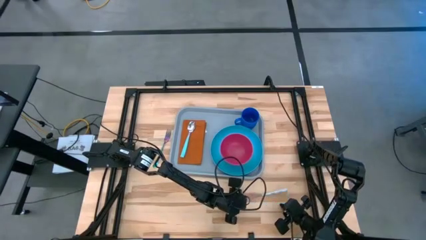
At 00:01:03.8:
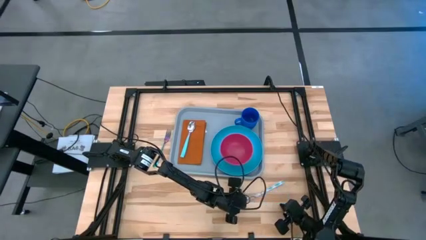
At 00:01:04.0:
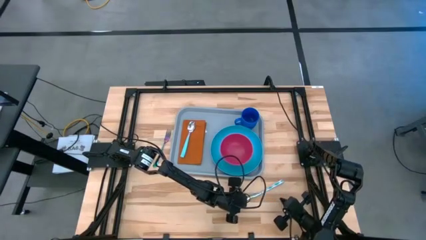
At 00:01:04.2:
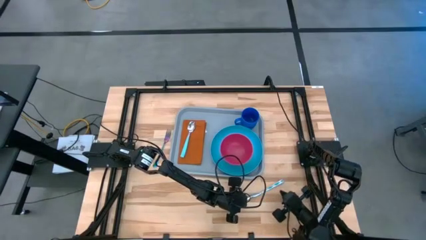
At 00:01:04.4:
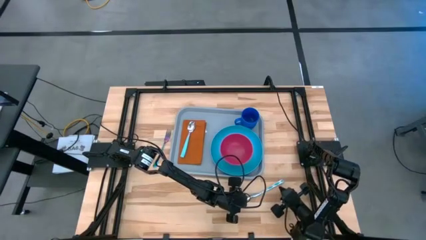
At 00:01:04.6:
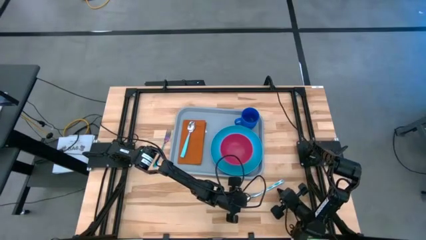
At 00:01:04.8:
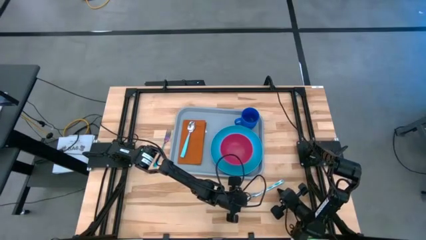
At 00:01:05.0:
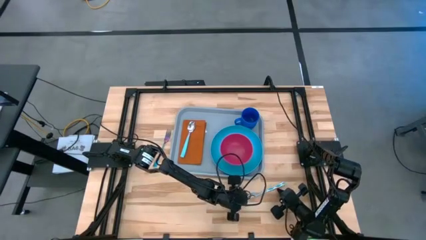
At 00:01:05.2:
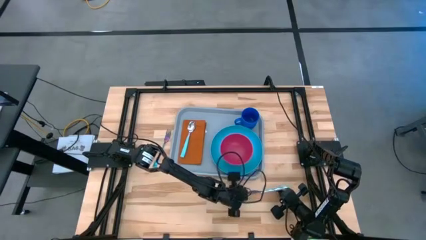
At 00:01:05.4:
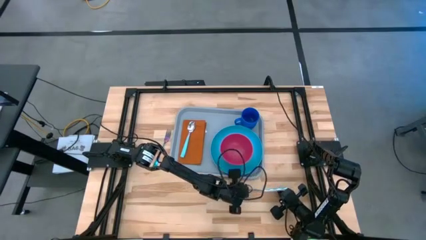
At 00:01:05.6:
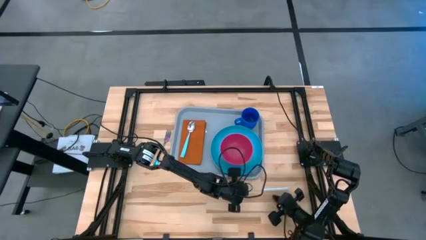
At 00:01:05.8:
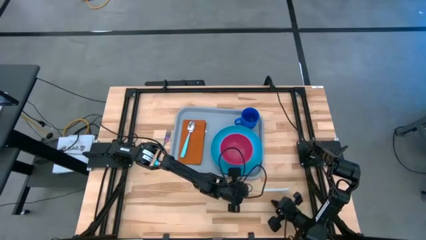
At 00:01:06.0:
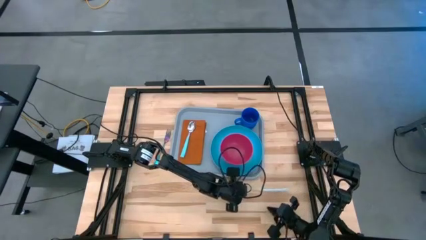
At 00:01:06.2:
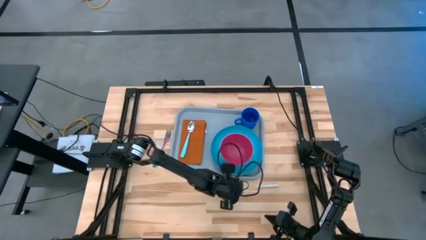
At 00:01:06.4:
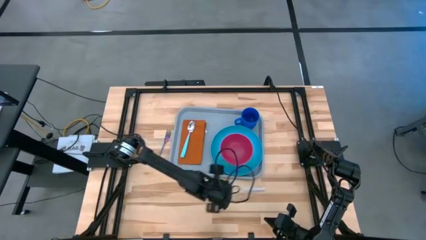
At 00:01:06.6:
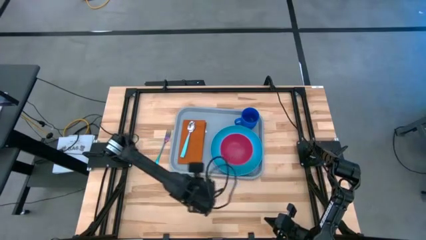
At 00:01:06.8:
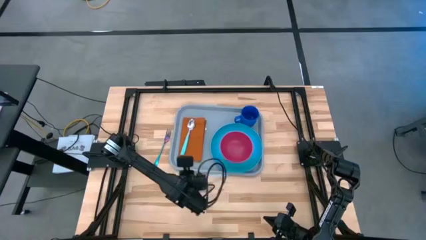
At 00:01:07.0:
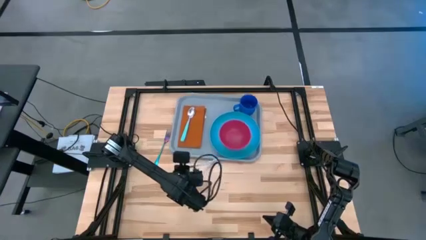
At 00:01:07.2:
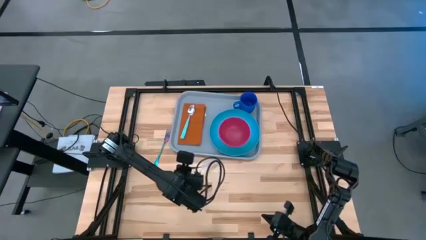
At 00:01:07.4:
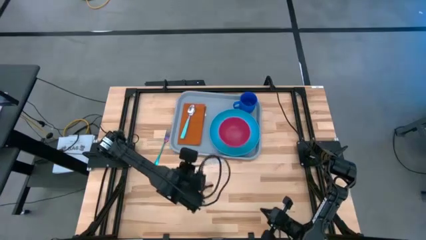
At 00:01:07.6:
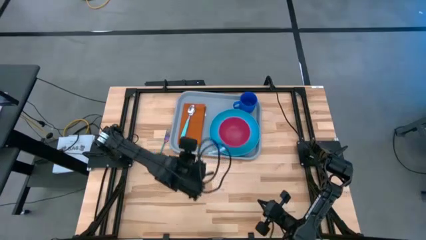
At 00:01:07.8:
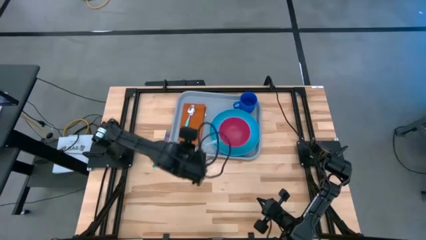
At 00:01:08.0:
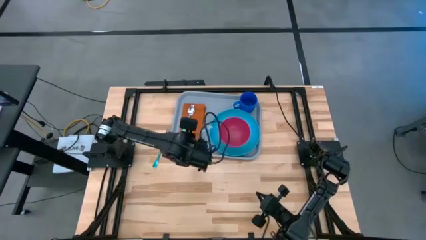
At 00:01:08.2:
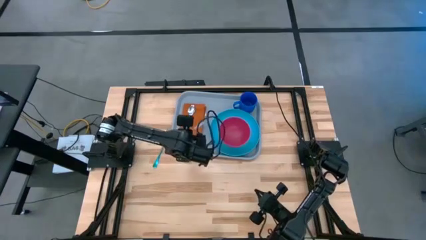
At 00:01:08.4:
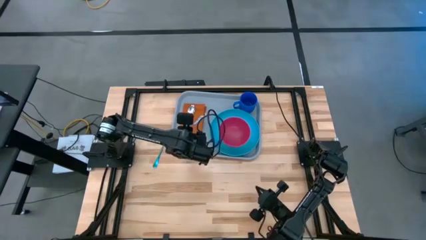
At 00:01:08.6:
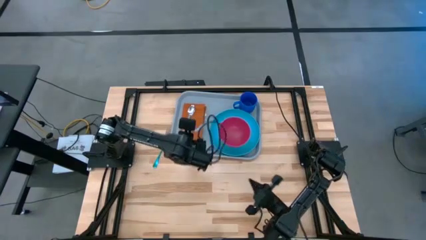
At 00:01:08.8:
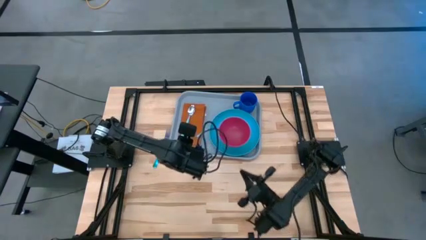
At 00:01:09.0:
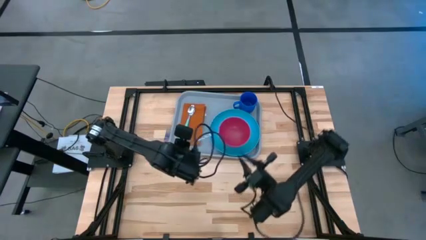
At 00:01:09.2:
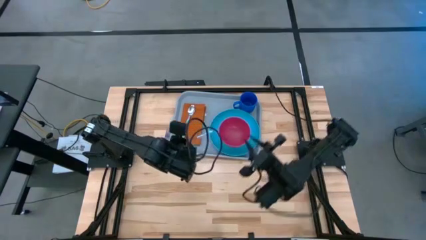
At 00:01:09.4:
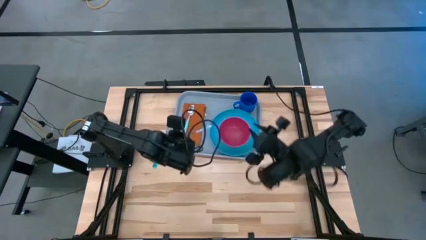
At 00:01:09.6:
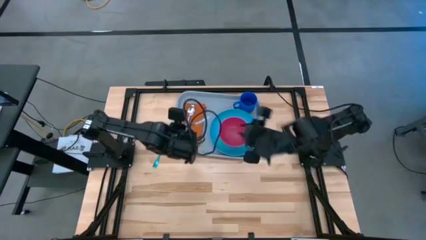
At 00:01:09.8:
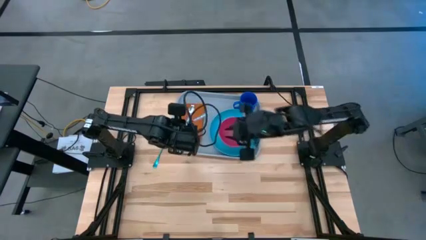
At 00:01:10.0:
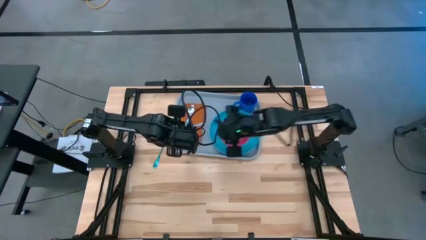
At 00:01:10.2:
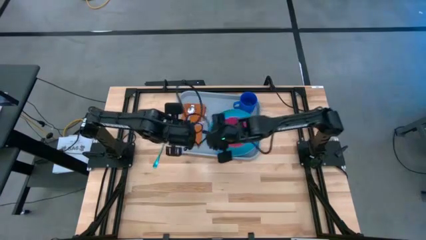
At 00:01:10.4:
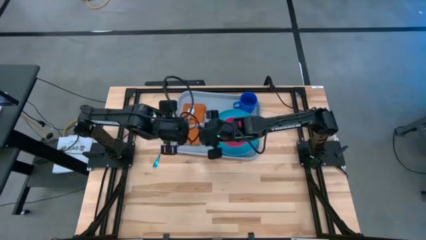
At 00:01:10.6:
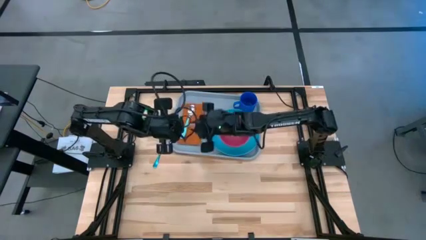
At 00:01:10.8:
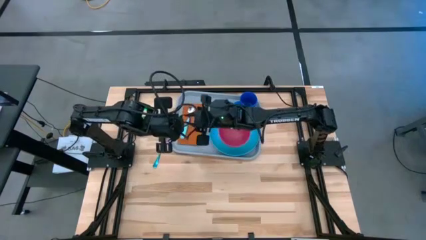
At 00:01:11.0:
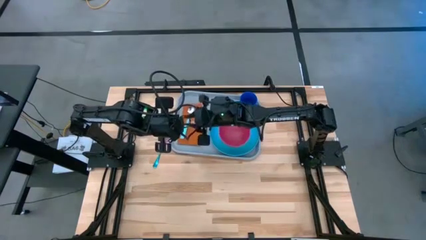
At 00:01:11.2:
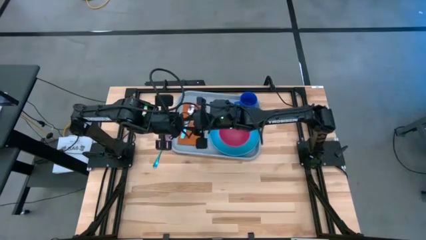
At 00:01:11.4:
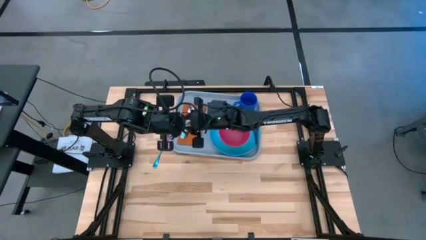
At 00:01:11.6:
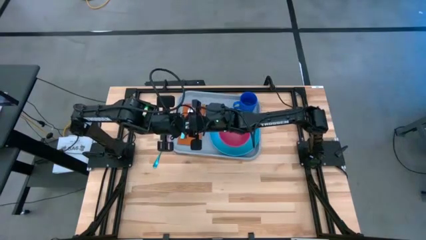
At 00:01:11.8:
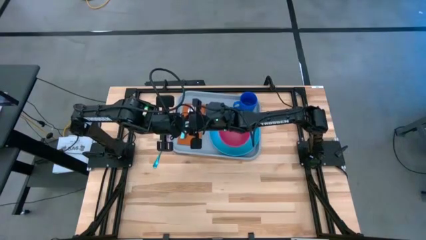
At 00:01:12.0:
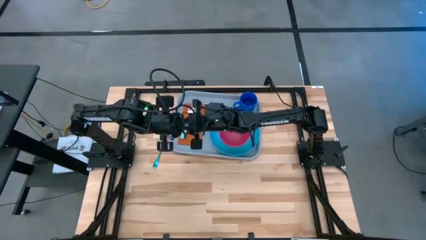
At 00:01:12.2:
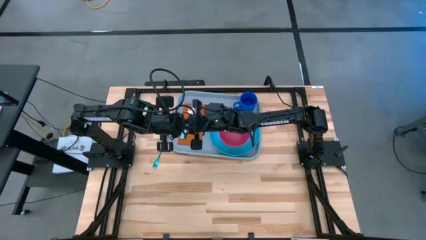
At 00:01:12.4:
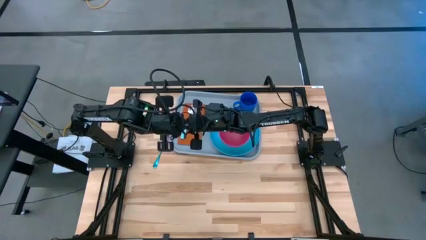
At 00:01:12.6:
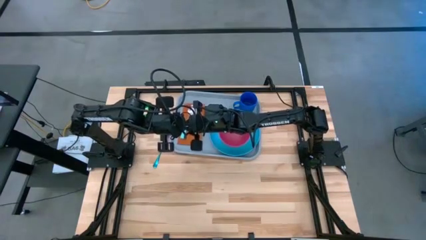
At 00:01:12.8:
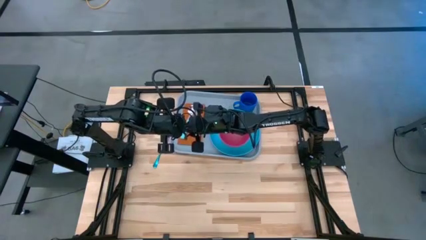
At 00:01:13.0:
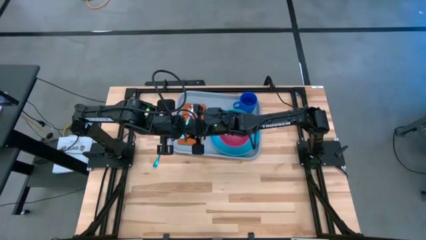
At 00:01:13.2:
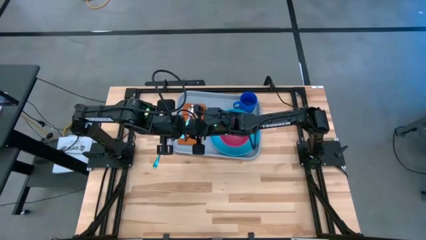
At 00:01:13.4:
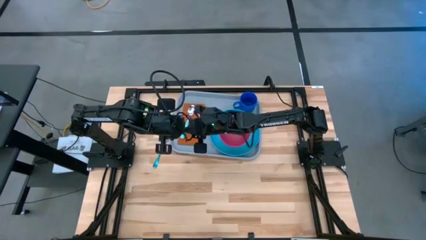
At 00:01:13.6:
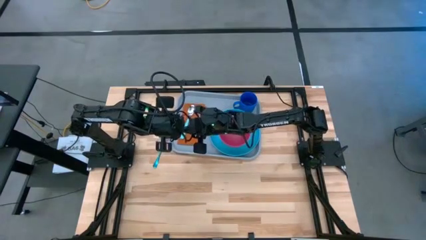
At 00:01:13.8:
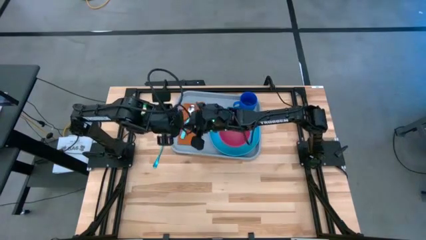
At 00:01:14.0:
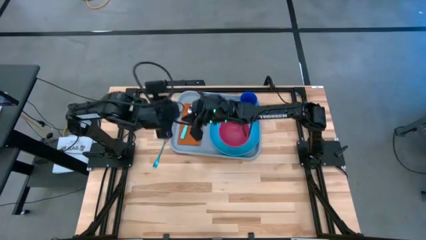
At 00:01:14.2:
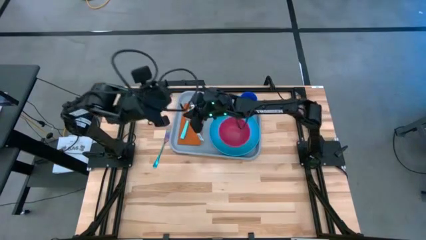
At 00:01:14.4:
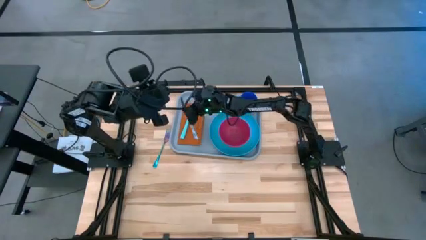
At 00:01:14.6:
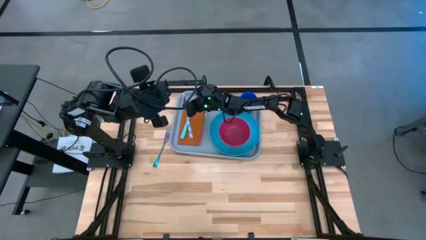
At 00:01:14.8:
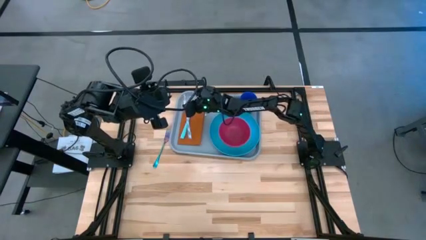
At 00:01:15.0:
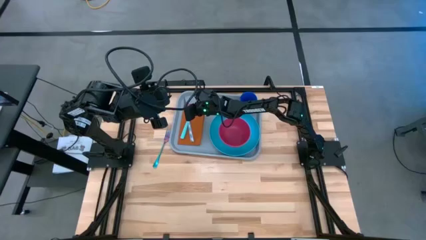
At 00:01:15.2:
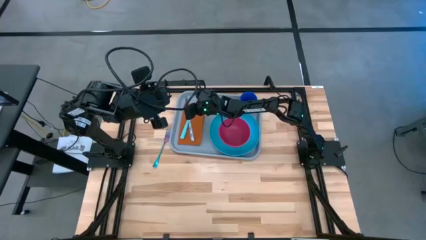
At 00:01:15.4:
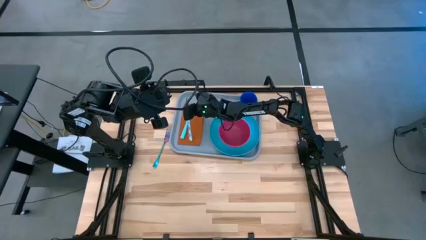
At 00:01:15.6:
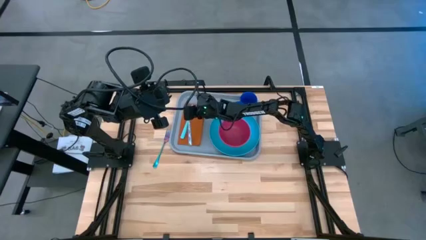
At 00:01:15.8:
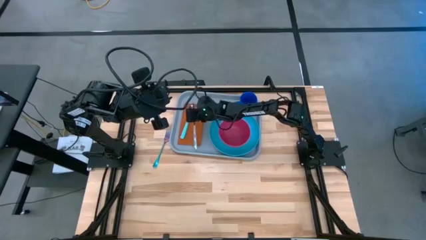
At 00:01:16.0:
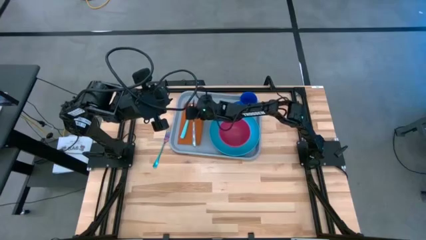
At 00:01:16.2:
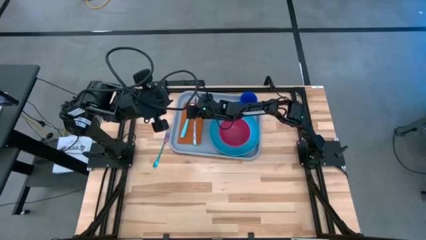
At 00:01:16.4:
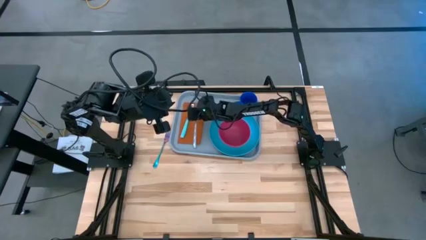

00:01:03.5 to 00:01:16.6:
Task: Set up tray
Put the white patterned knife on the brown table napkin to the left of the blue plate

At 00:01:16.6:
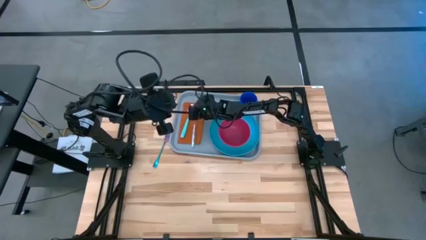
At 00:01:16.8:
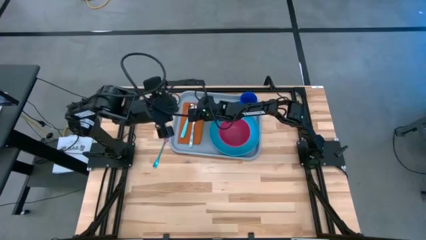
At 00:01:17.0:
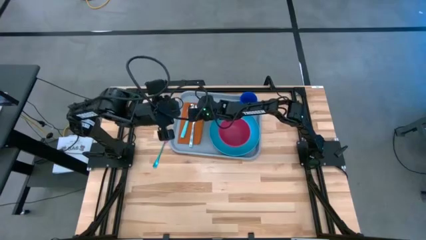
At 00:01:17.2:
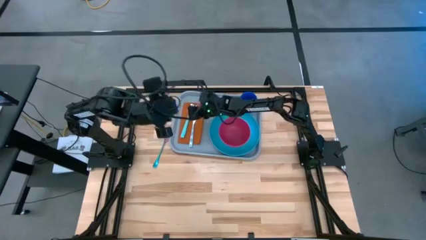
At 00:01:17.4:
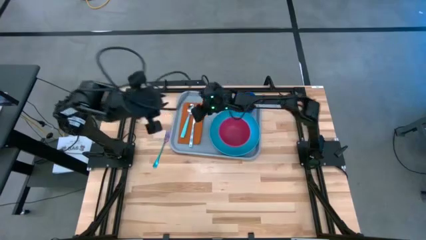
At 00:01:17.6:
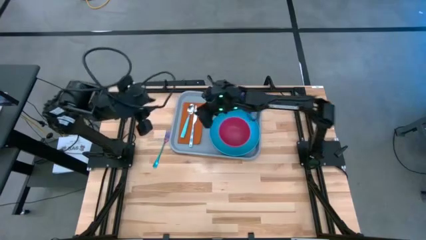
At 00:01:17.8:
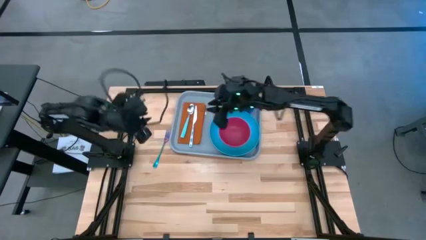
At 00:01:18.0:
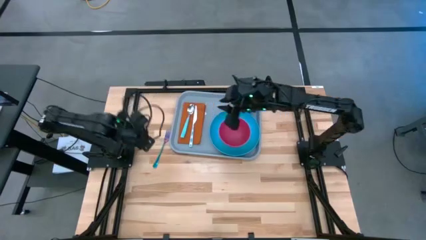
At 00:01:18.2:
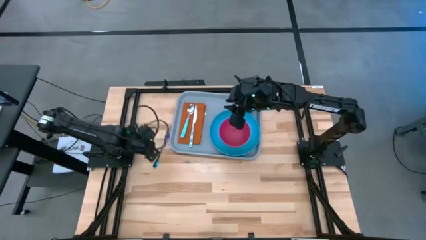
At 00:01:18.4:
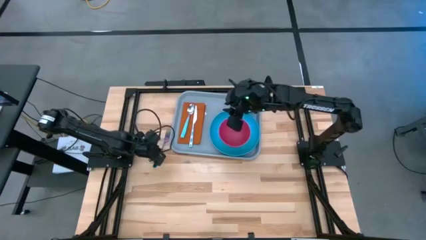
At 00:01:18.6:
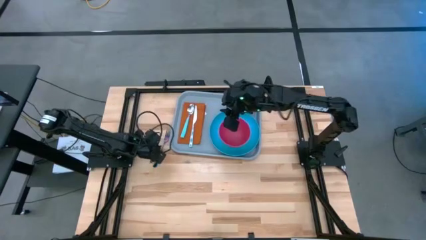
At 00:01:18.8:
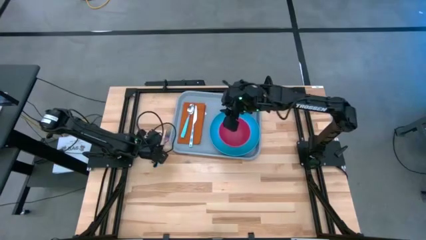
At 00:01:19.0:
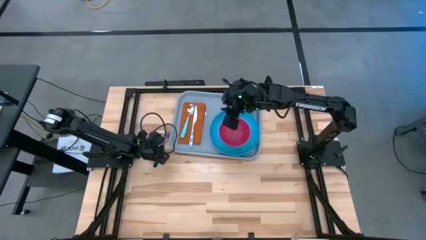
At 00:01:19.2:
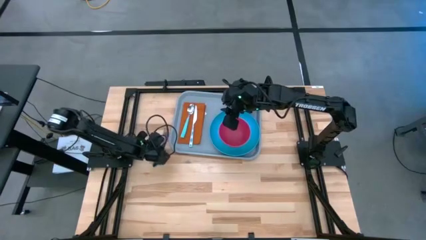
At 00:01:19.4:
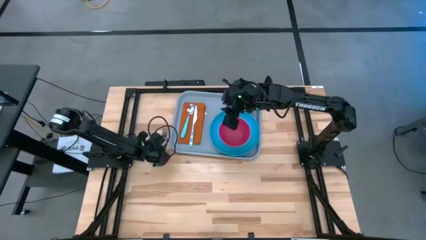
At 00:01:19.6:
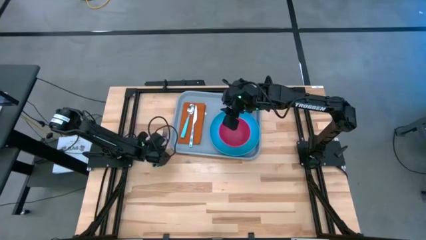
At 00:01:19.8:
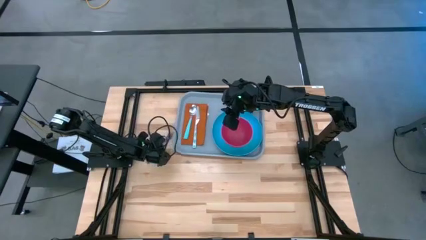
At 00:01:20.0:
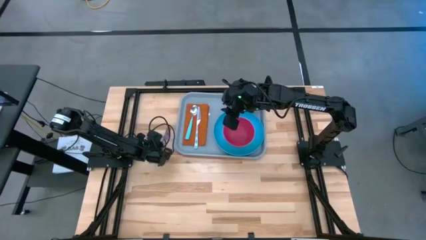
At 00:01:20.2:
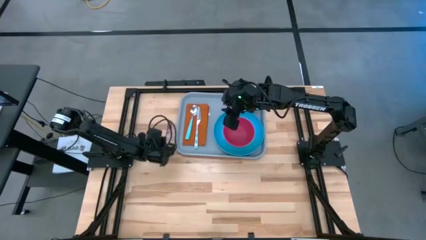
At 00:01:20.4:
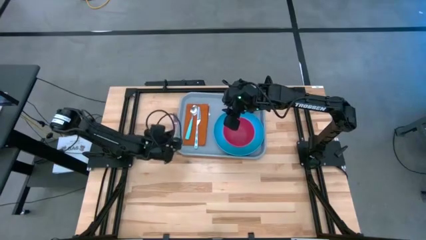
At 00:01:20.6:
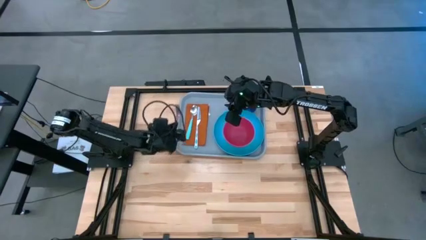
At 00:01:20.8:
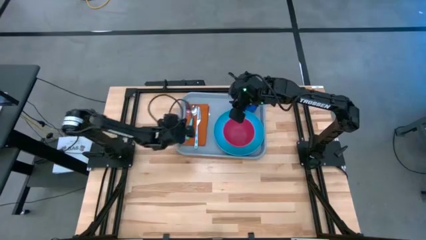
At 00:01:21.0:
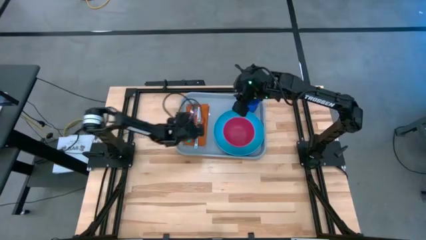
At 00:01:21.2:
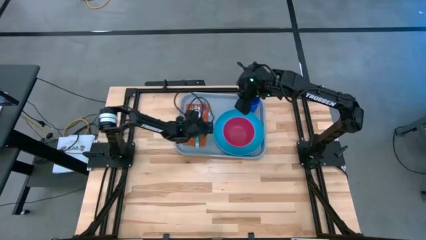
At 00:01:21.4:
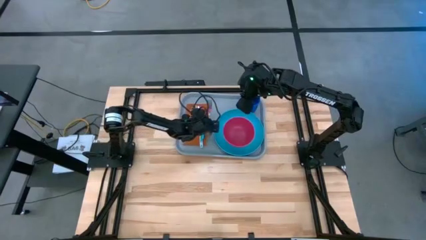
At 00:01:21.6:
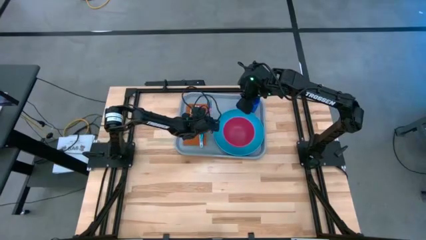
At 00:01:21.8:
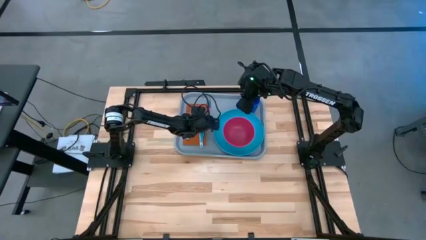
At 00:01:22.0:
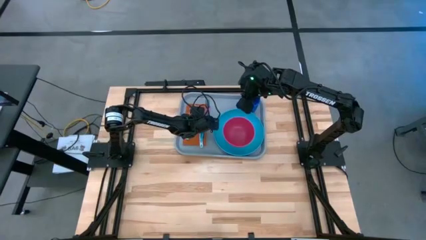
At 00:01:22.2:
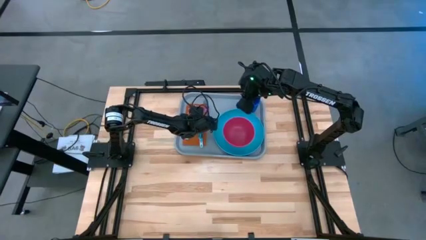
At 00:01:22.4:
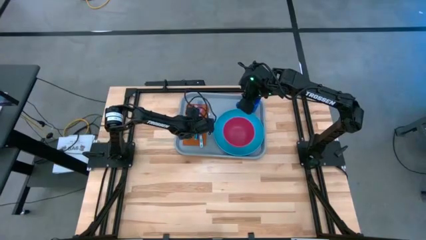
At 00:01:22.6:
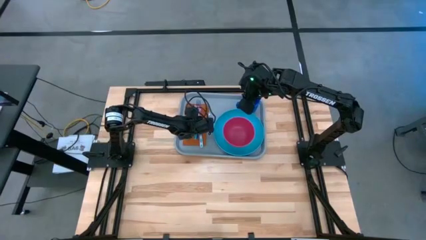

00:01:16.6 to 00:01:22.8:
Put the blue fork on the brown table napkin to the left of the white patterned knife
